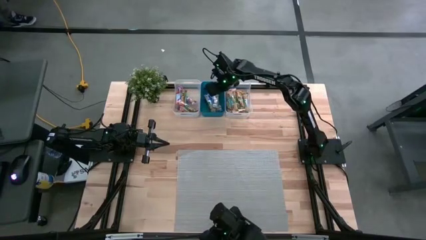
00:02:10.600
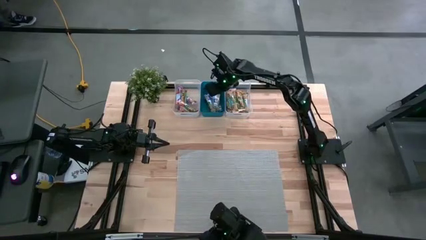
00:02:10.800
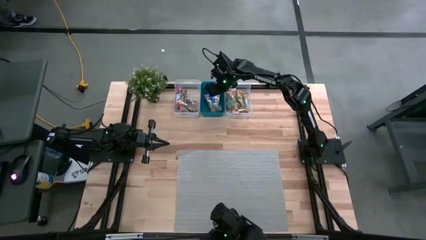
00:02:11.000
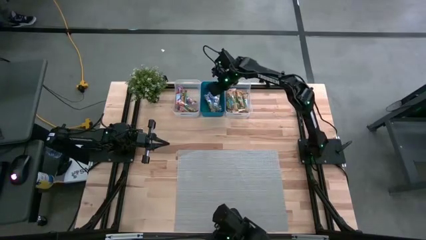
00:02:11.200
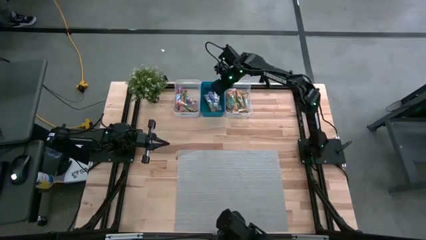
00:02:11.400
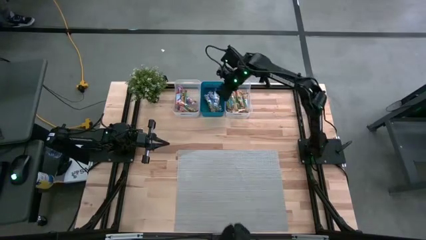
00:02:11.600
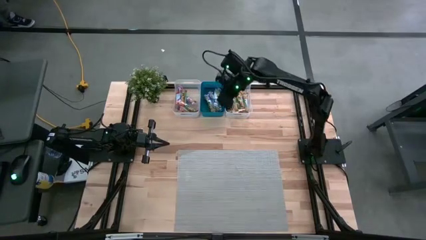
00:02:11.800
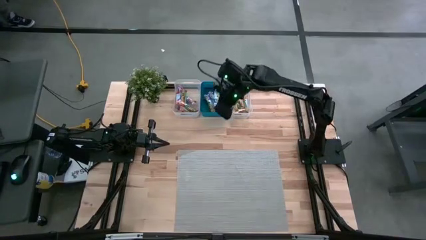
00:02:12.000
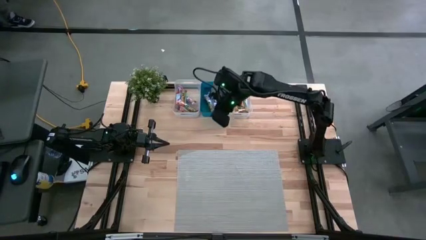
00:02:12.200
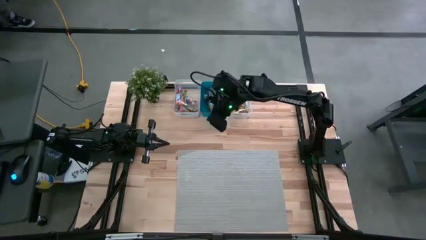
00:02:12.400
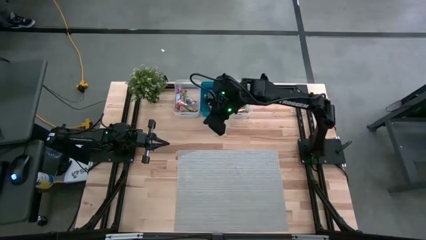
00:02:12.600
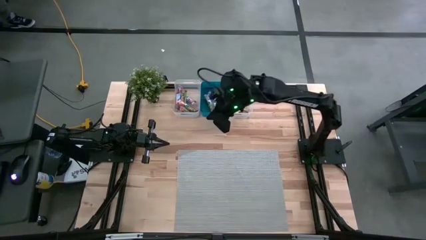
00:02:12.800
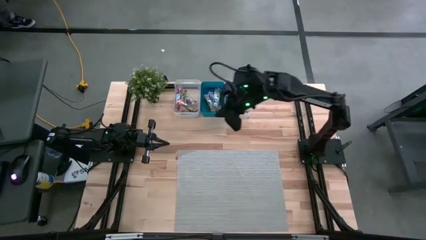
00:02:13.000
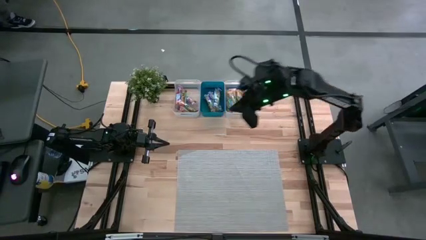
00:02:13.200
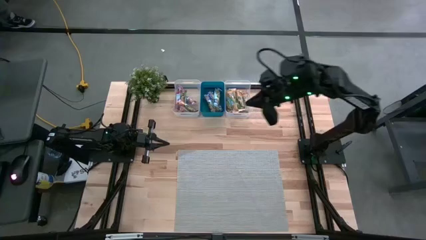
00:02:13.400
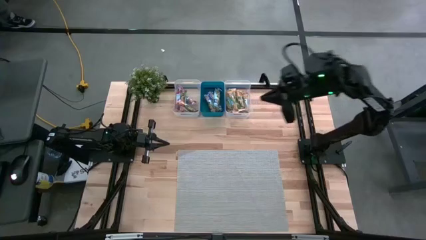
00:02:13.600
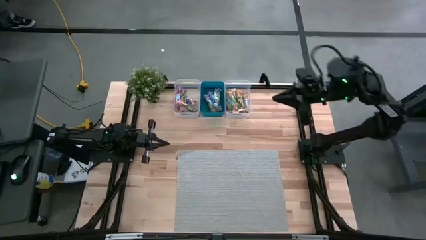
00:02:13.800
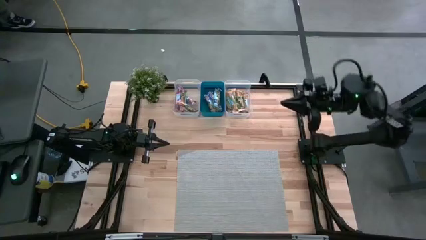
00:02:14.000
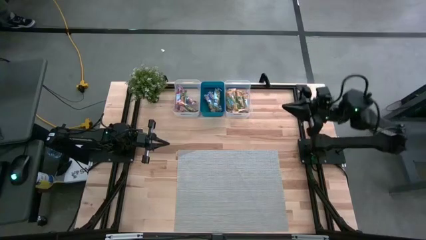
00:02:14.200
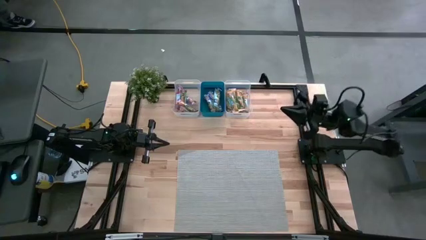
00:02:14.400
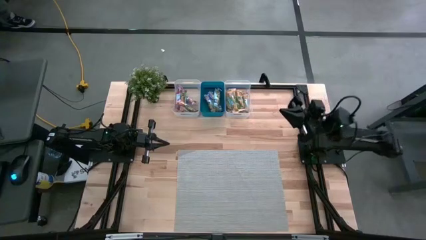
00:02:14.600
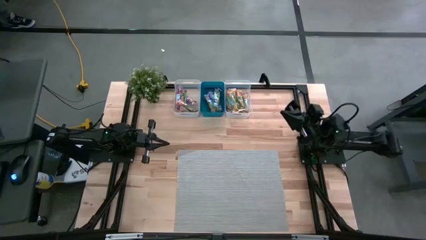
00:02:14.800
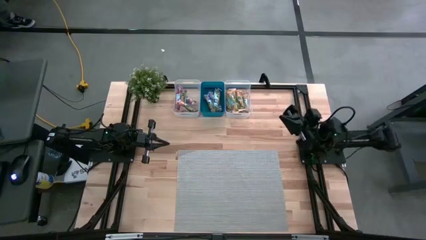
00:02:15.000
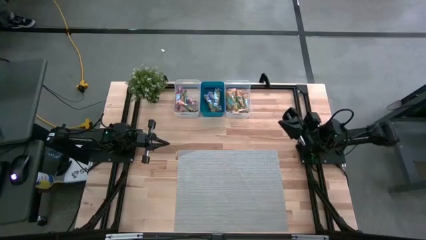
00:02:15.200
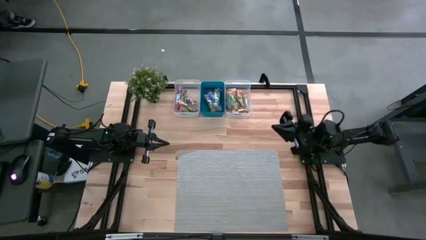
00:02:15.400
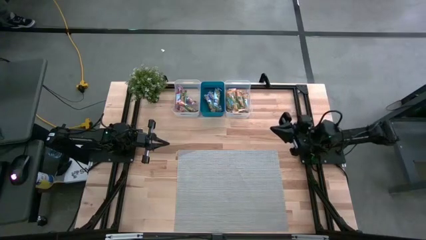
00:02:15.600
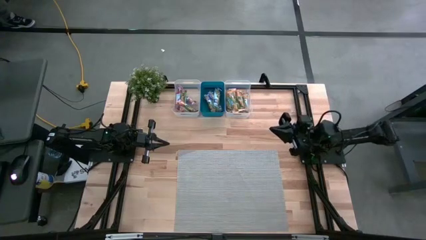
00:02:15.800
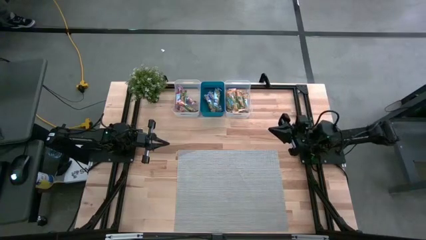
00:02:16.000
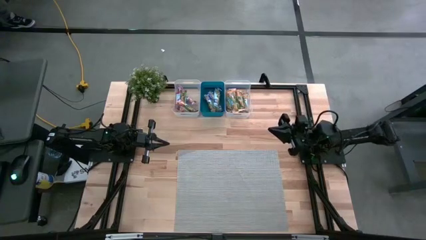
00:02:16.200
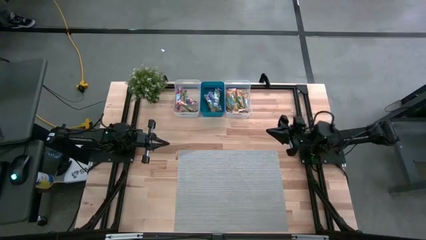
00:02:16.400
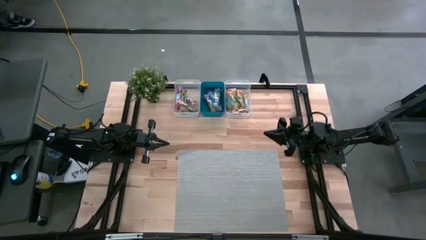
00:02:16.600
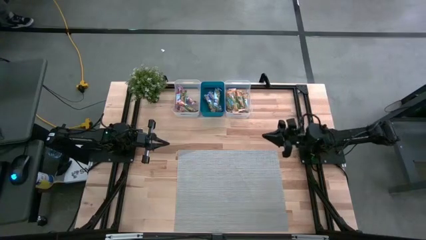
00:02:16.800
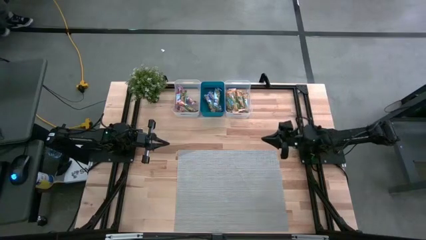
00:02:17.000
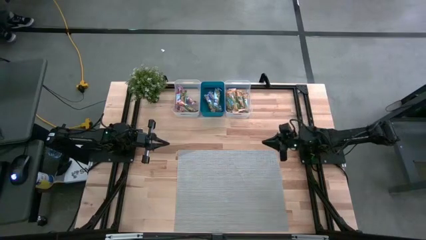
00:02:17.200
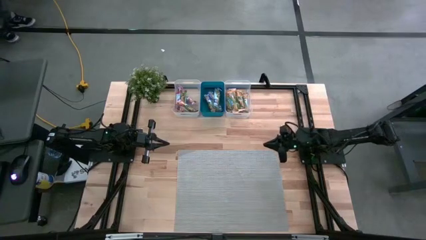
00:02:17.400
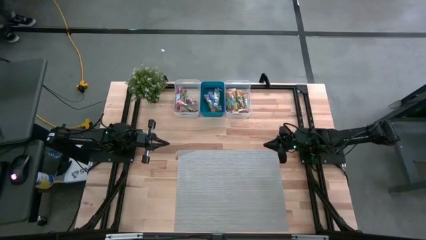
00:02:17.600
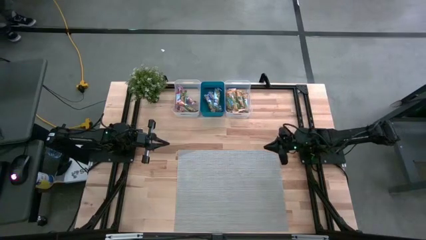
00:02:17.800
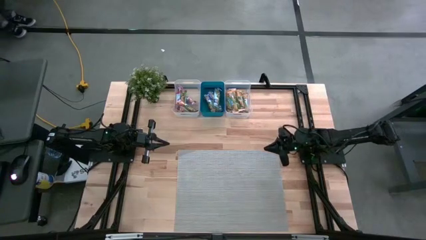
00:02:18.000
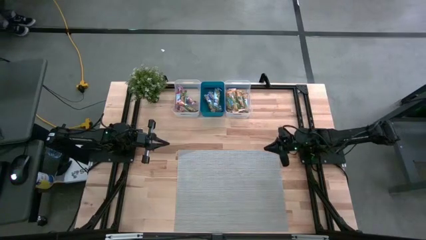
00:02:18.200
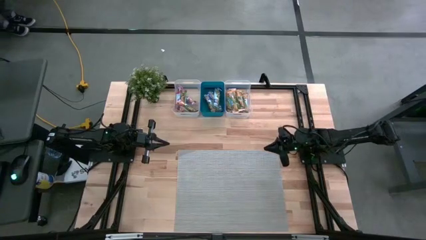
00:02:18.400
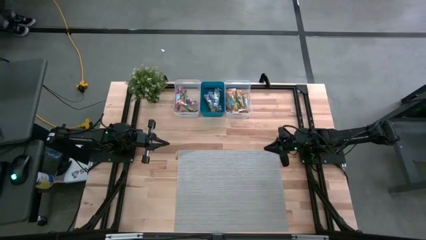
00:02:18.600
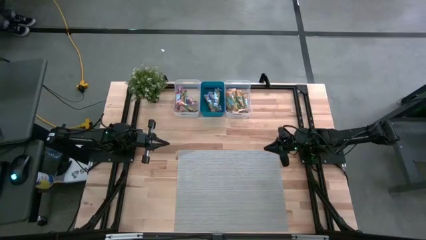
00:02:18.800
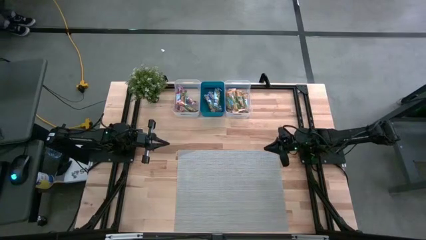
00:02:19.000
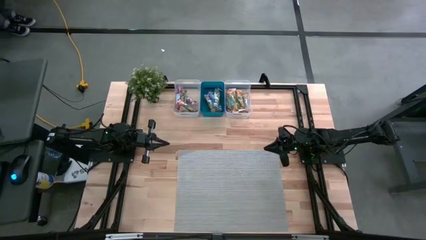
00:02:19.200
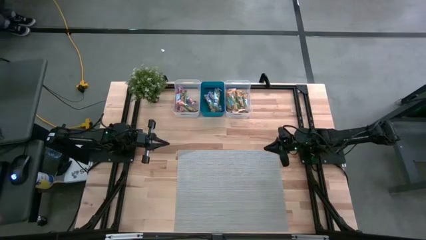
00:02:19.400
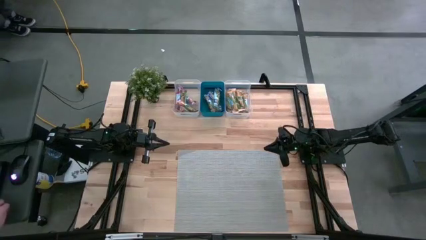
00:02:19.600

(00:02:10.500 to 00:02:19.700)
Task: Pick and place Granola Bars by type
Return to Home Position

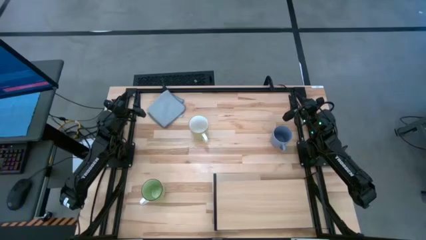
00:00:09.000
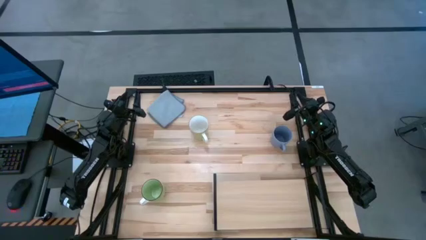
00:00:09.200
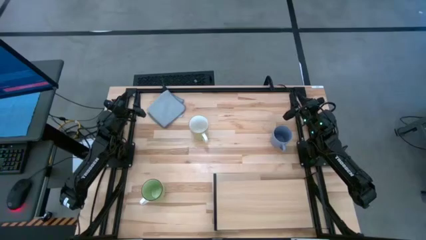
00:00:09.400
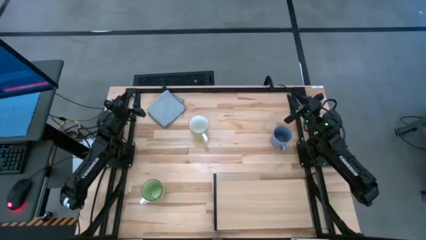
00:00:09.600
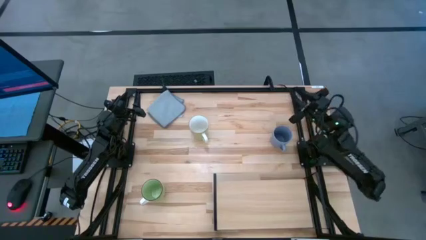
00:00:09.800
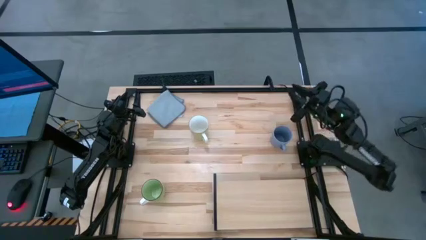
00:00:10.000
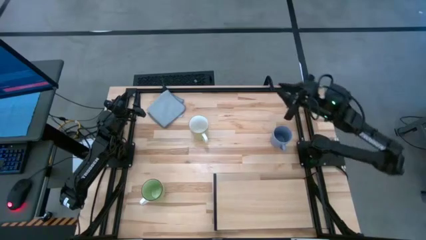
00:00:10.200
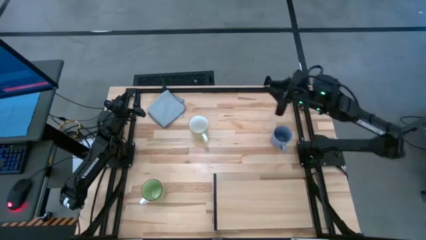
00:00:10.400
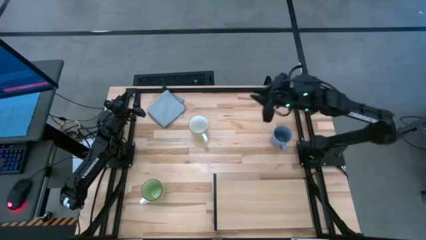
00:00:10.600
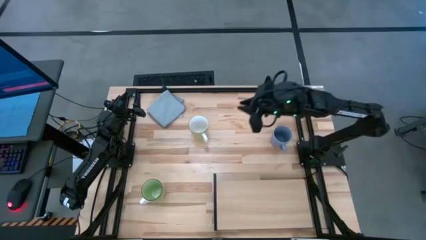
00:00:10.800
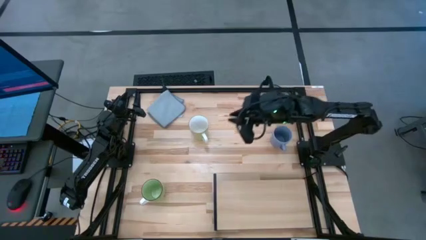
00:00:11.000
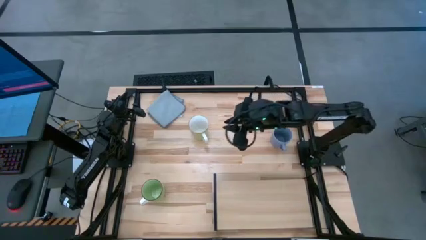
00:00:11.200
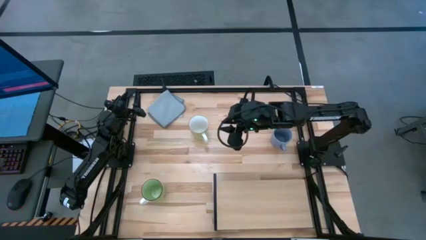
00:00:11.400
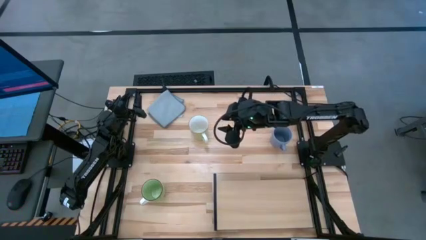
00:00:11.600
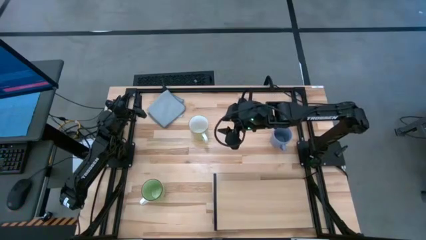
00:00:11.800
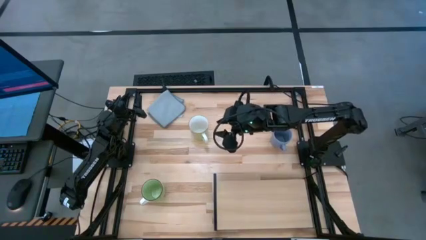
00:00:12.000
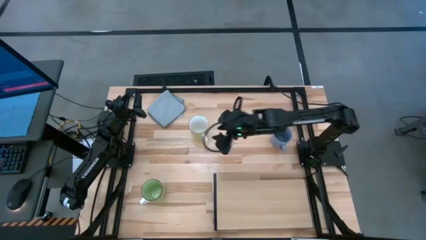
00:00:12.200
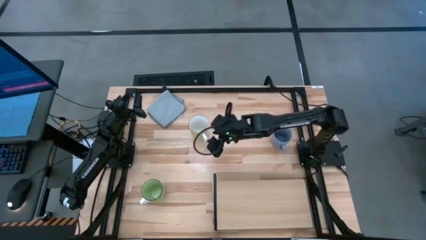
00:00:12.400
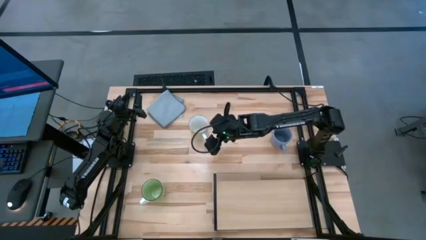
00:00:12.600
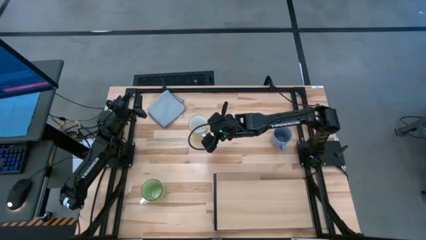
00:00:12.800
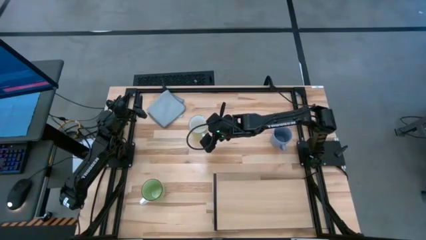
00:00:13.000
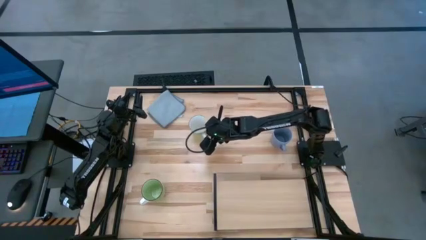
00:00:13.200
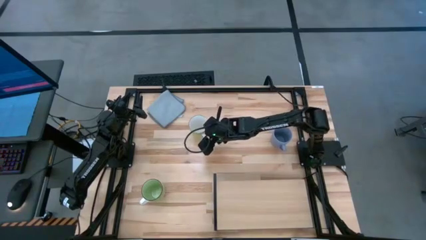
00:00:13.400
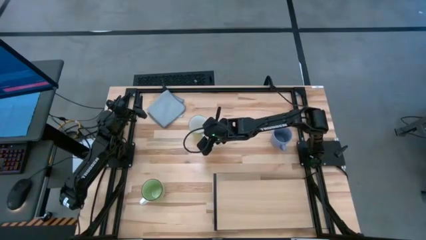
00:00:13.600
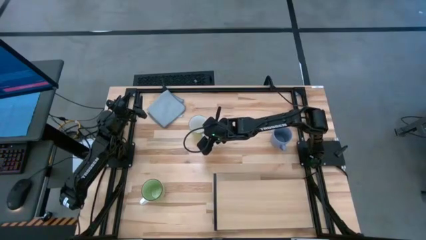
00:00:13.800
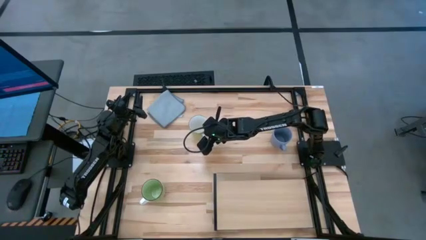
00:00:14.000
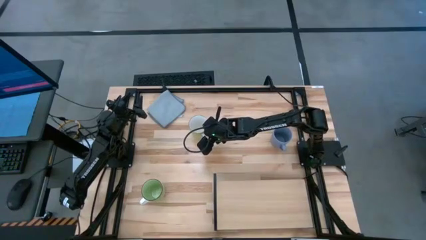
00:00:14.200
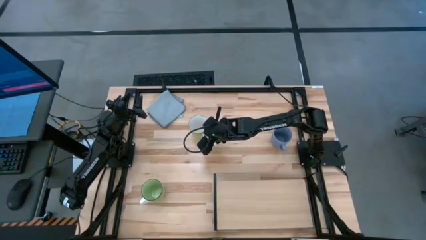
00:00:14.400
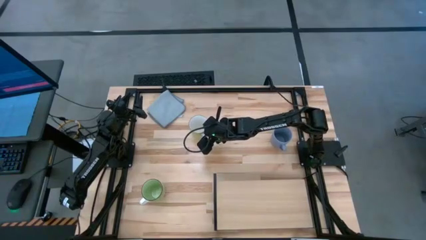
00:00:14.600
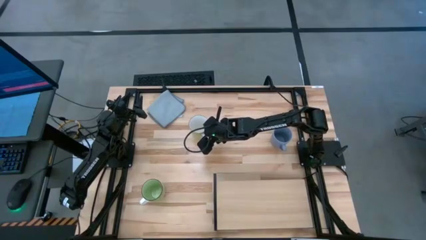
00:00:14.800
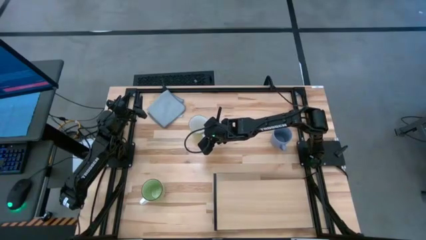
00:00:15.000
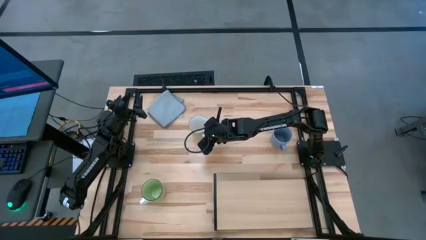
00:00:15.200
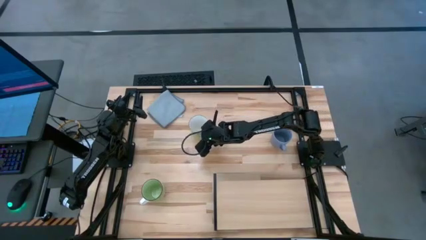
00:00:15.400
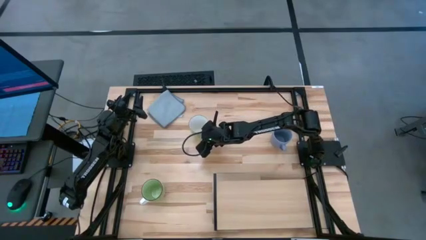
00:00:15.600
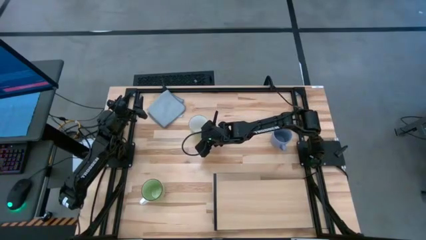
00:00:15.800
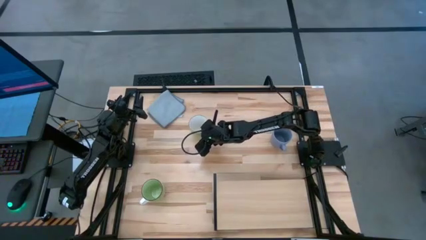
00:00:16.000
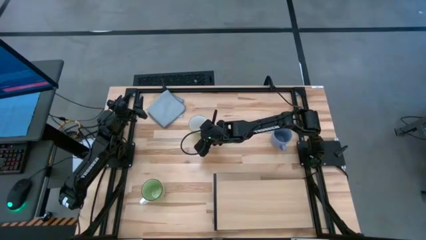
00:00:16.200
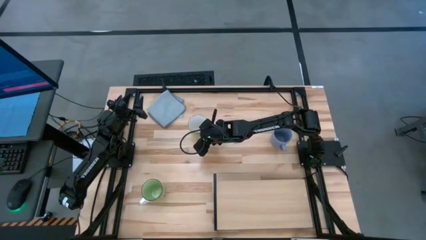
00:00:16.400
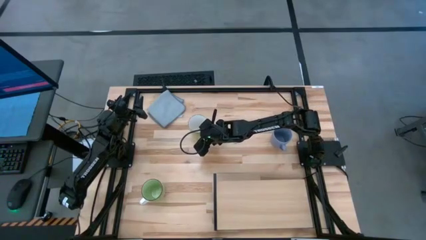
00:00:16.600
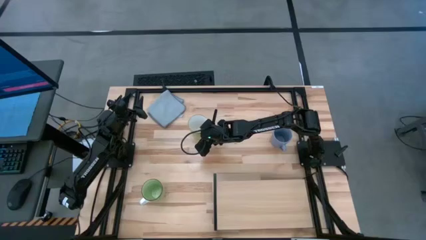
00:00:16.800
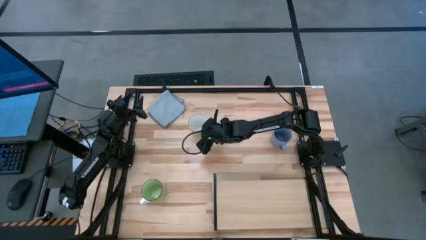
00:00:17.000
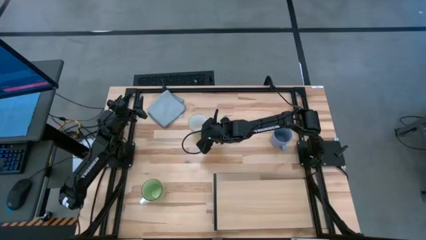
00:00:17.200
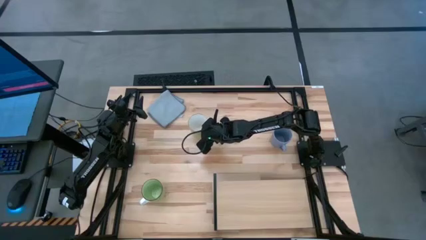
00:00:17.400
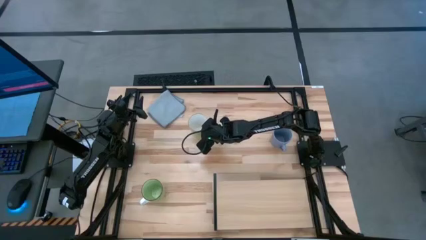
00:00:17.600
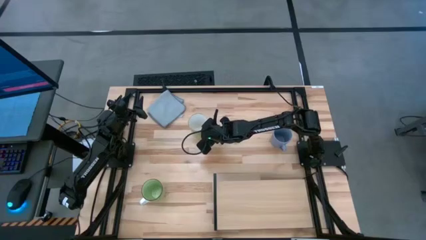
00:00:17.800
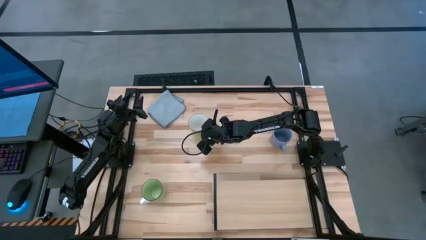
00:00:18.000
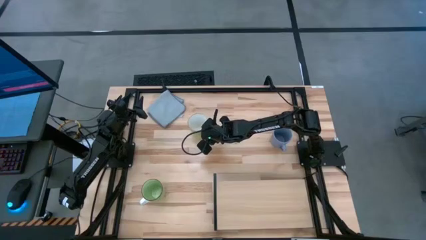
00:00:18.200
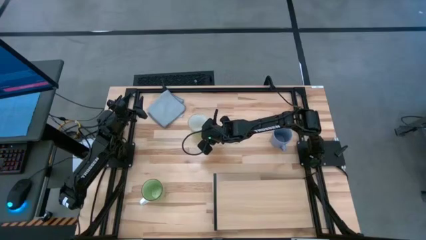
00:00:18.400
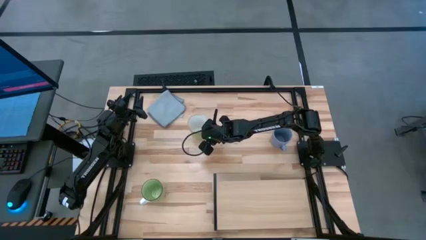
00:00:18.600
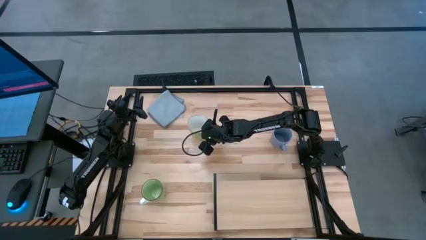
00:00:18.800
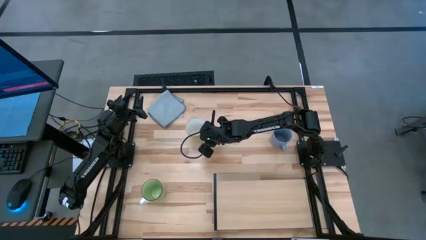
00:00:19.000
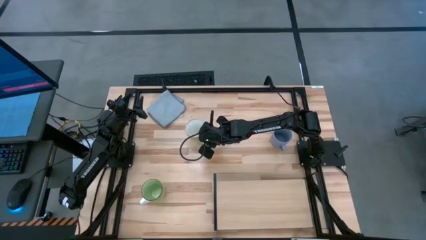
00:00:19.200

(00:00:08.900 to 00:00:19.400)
Task: Stack small to large cups/mugs on shelf
Put the white cup on the shelf
